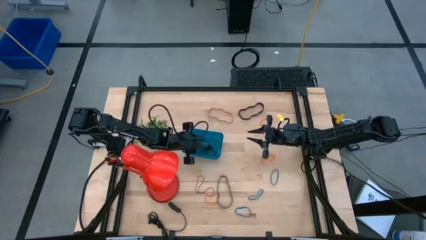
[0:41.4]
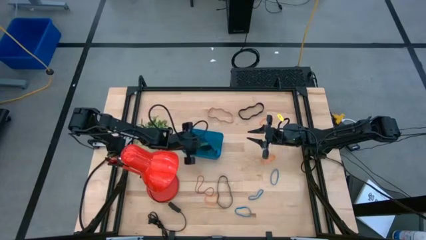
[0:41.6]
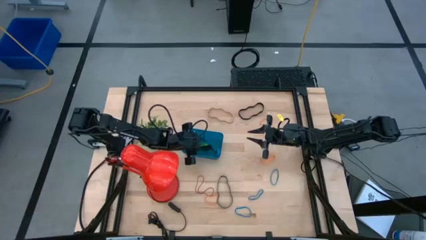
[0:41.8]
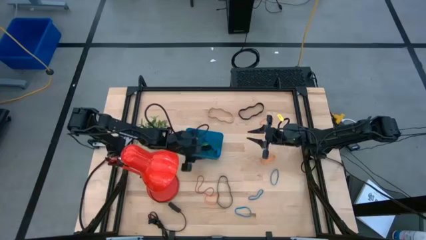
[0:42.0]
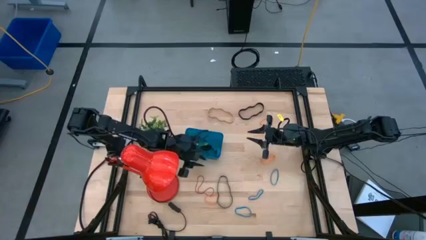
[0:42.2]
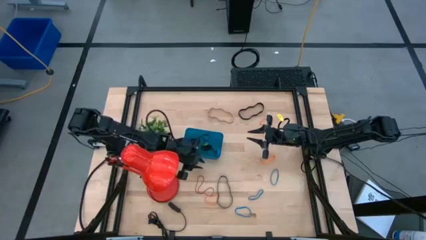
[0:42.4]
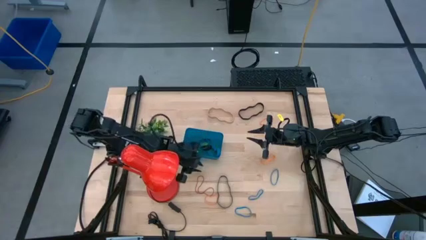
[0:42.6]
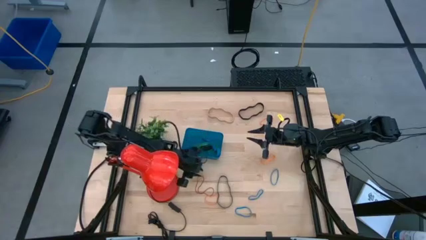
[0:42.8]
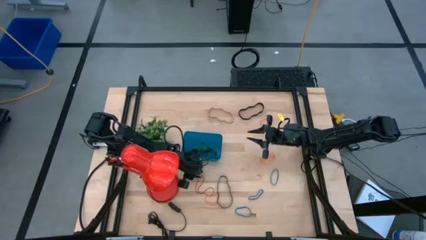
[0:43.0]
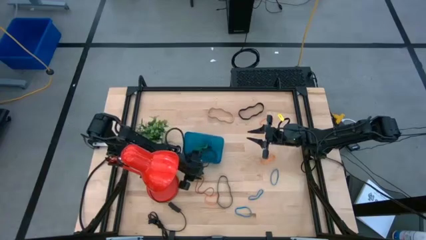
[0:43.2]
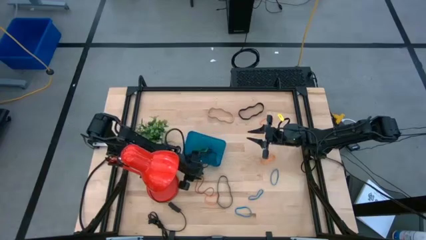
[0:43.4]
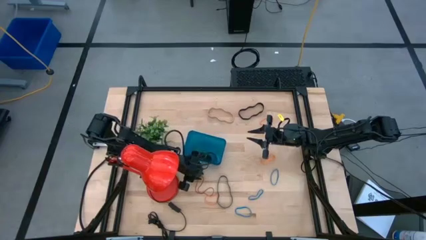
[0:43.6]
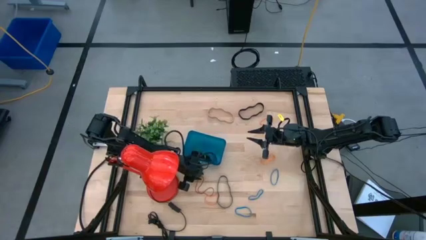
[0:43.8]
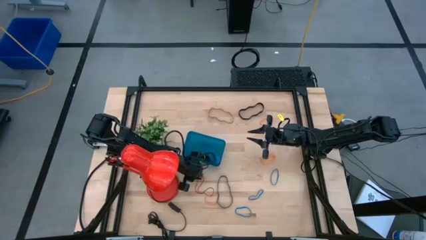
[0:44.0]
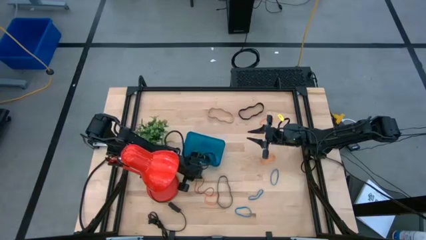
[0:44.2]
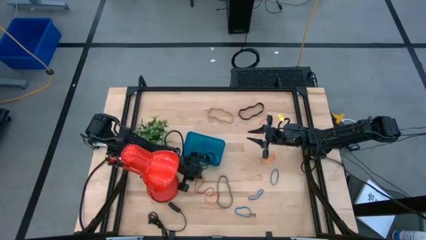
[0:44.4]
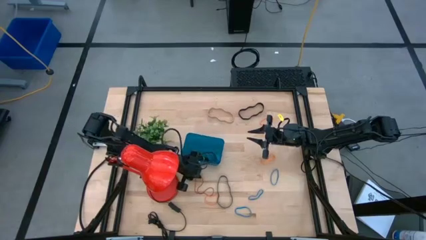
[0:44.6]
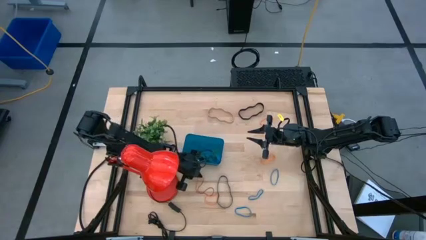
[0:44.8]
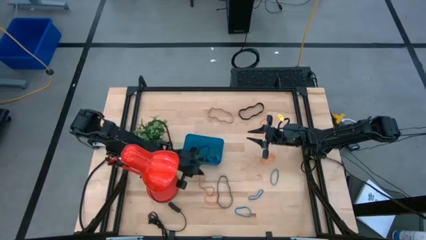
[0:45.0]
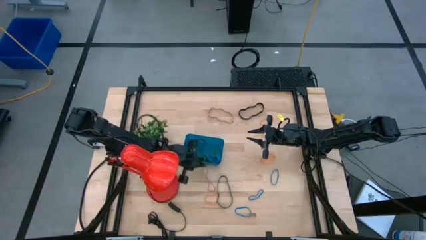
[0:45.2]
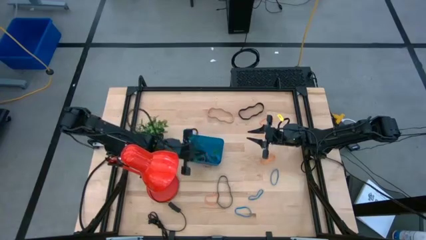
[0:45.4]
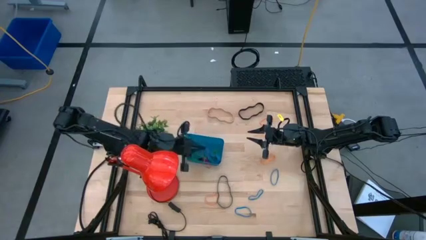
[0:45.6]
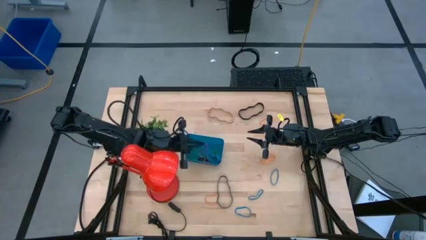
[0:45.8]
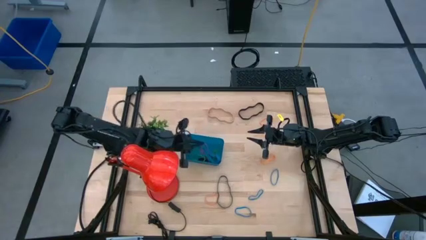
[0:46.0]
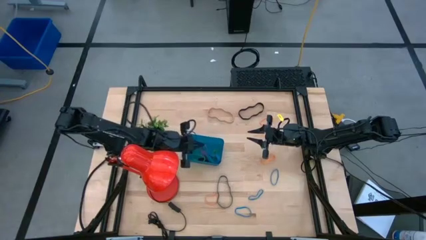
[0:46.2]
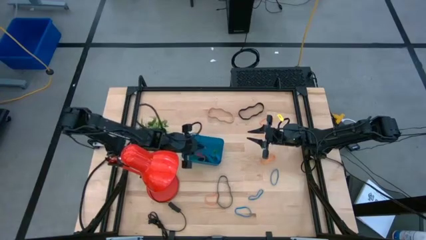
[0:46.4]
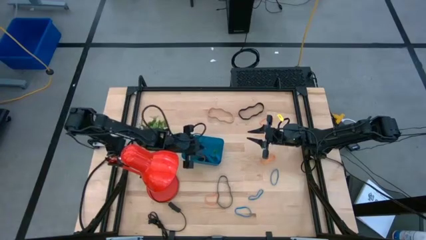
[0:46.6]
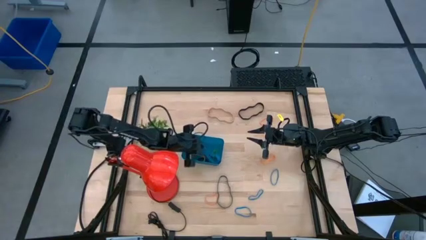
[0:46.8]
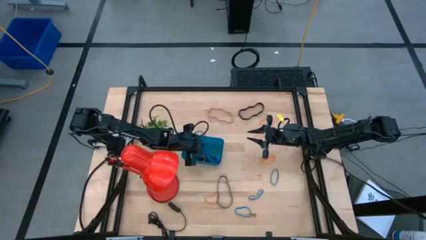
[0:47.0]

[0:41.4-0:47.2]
Task: Pick and place rubber bands into bin
Put the red rubber band into the blue bin

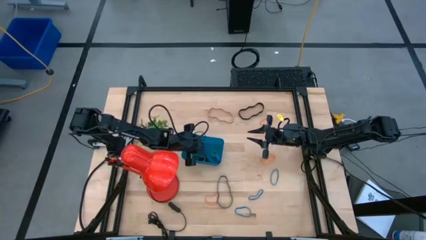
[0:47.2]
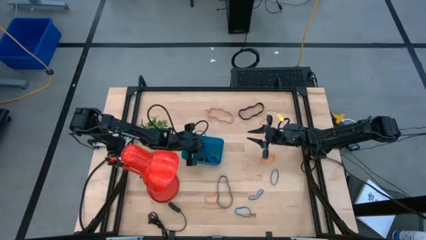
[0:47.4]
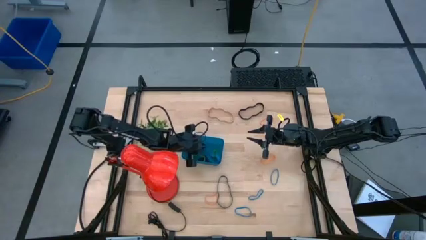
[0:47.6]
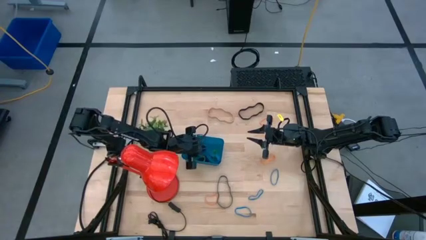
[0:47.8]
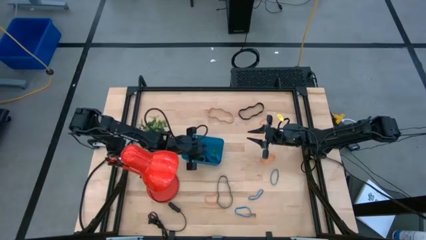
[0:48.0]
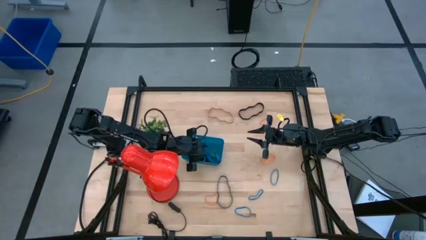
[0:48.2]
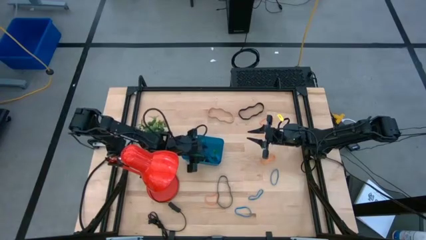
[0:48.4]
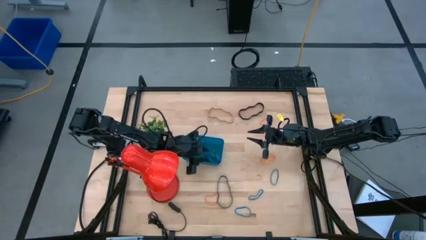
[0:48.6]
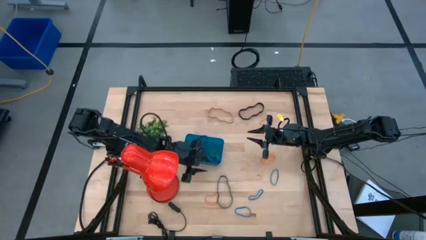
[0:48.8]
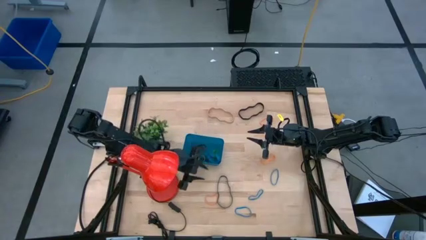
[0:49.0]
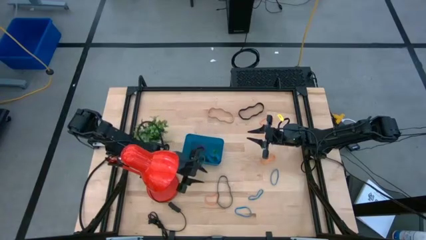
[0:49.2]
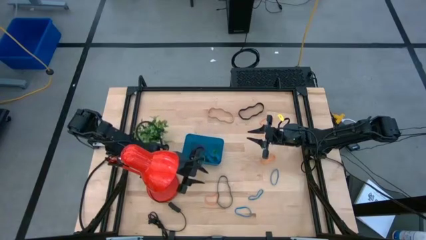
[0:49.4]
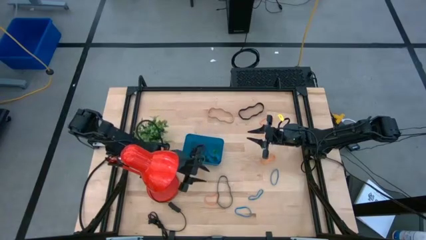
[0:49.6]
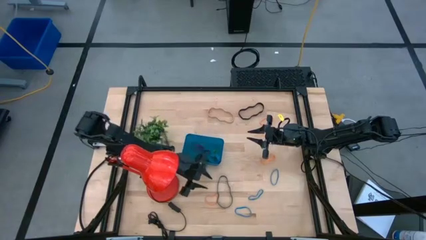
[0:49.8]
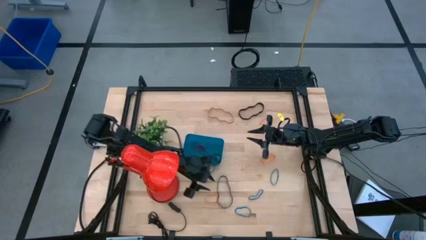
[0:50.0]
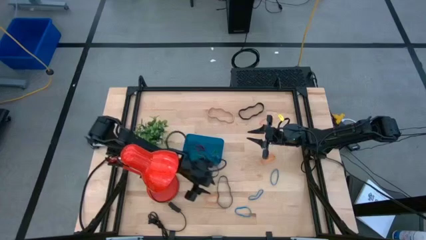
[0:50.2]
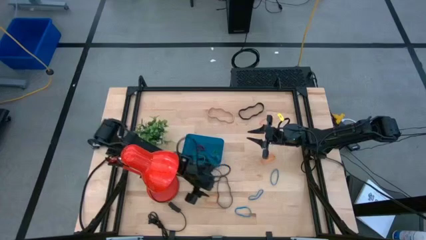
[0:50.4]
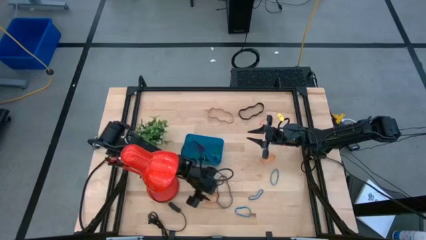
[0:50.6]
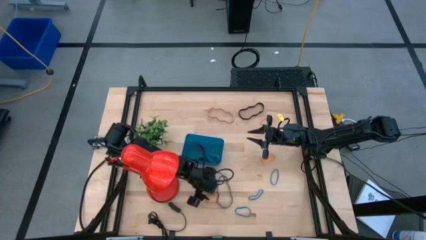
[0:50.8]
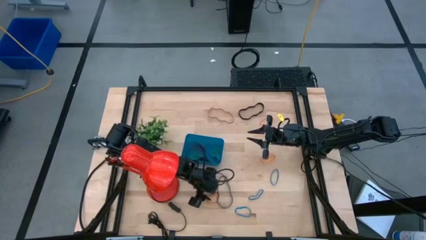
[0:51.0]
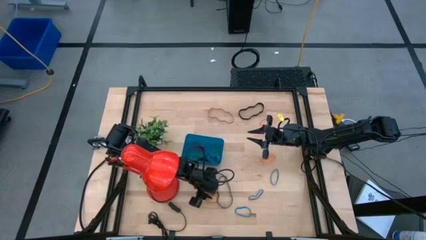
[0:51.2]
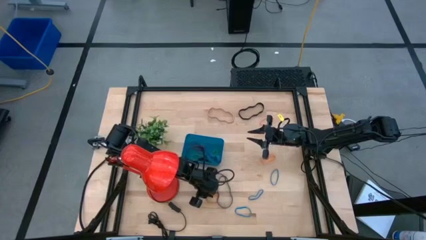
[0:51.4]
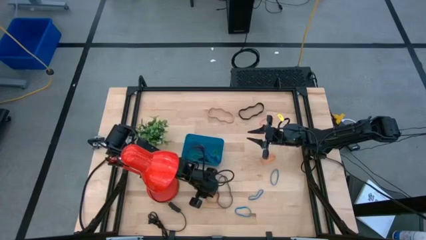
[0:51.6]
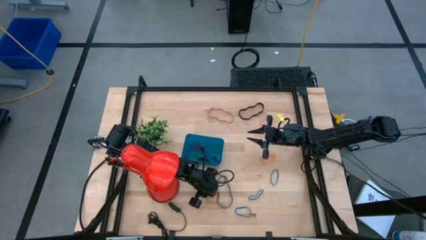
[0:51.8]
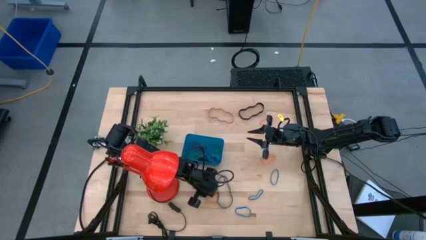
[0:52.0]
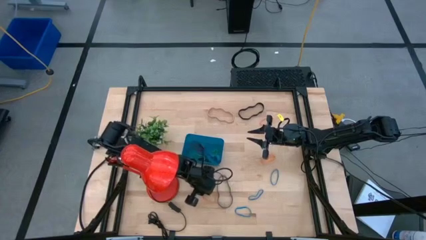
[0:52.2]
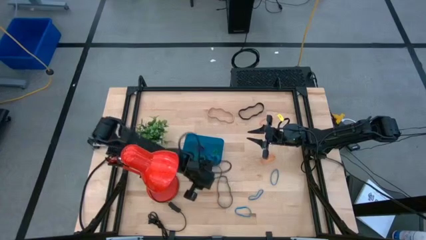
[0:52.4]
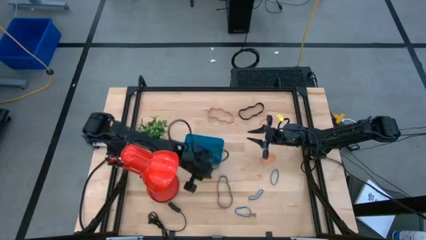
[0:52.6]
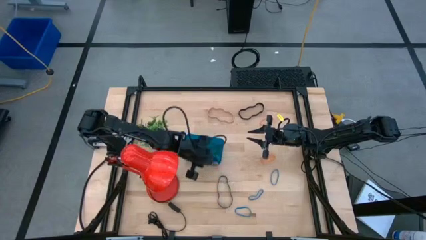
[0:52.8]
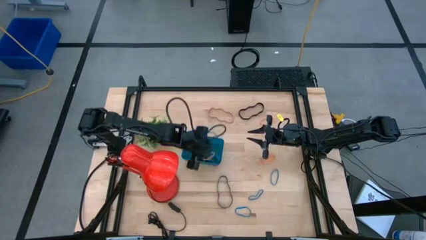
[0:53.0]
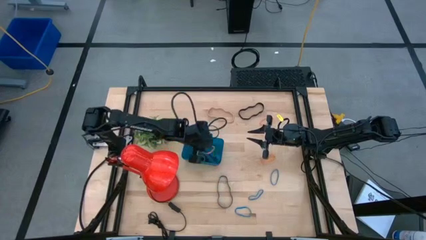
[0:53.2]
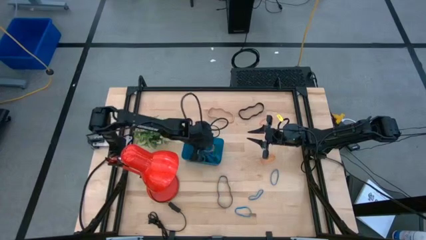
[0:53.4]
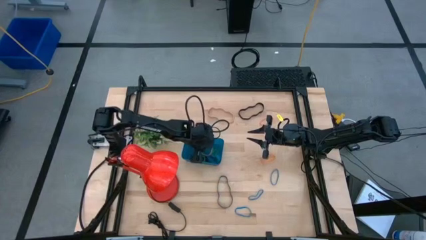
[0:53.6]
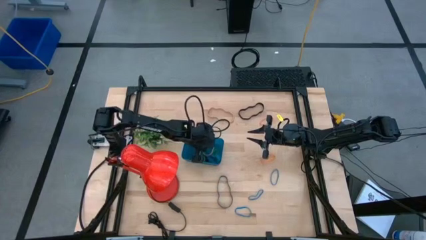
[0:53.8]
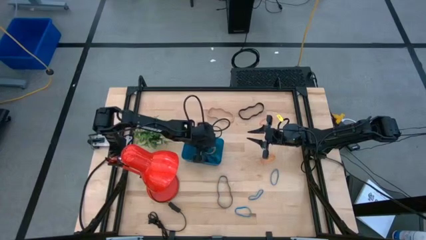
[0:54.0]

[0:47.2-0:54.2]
Put the orange rubber band into the blue bin

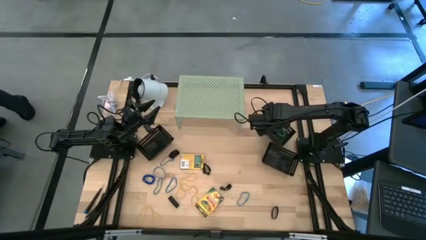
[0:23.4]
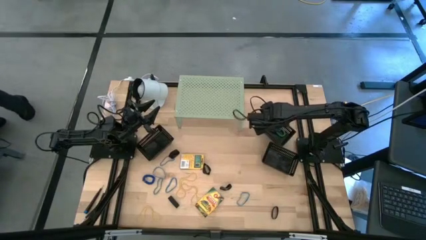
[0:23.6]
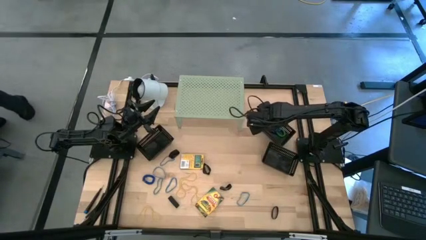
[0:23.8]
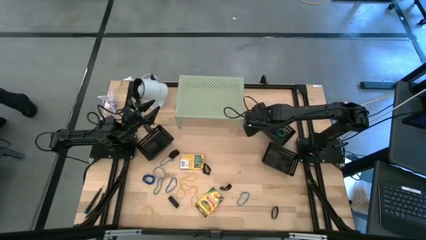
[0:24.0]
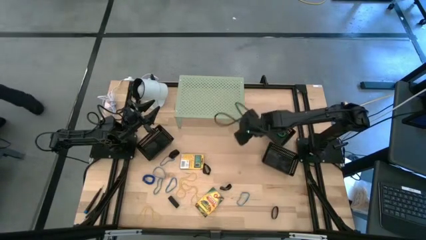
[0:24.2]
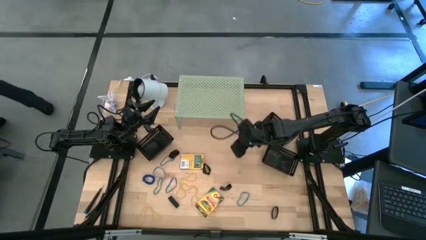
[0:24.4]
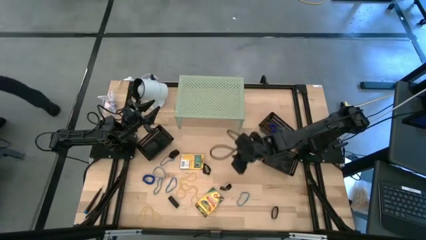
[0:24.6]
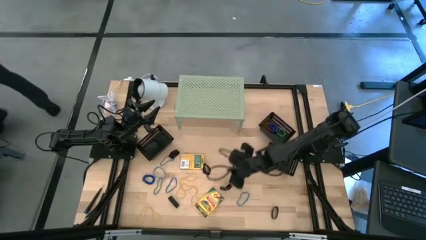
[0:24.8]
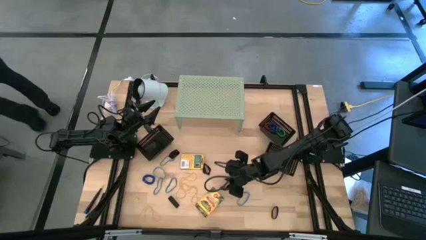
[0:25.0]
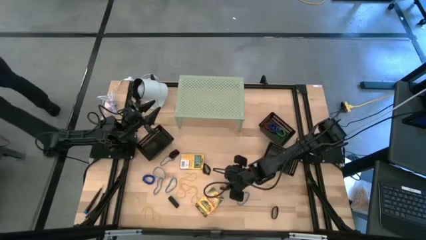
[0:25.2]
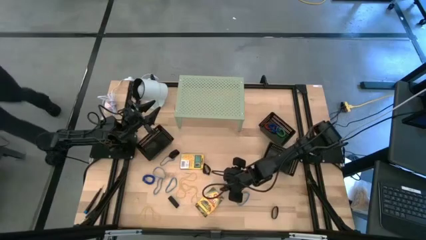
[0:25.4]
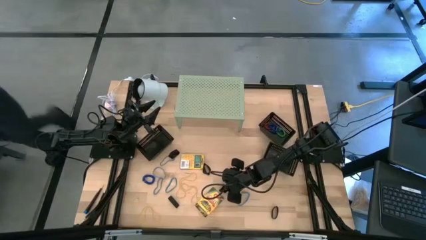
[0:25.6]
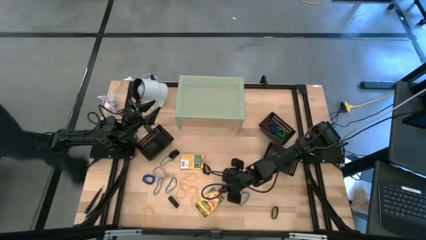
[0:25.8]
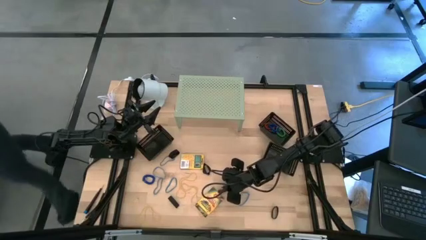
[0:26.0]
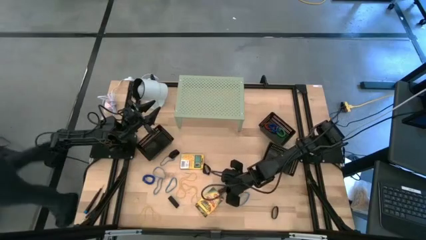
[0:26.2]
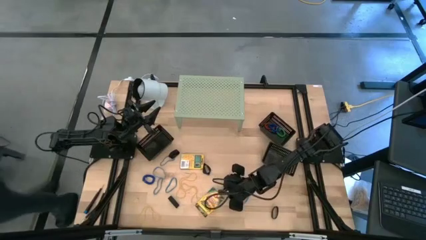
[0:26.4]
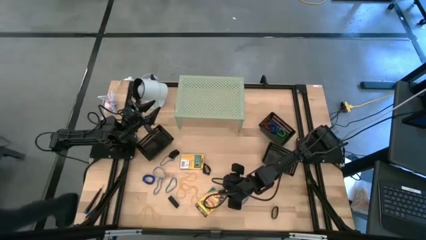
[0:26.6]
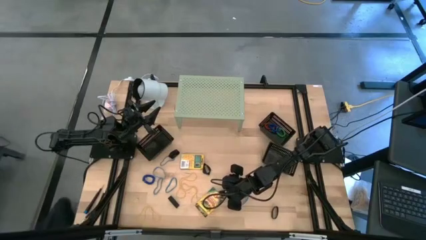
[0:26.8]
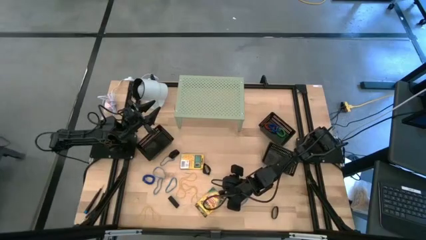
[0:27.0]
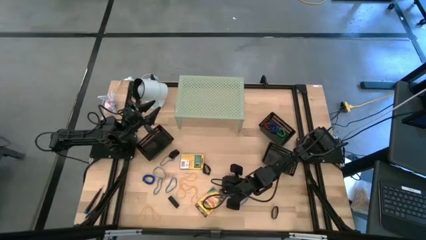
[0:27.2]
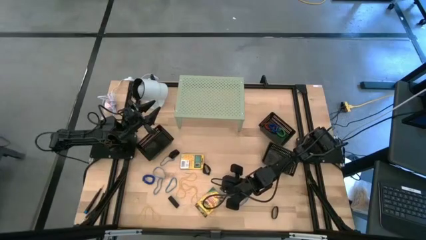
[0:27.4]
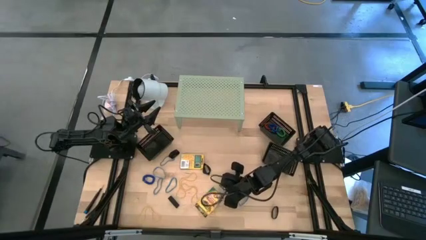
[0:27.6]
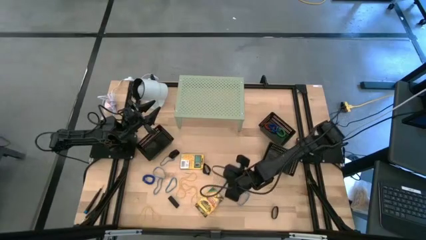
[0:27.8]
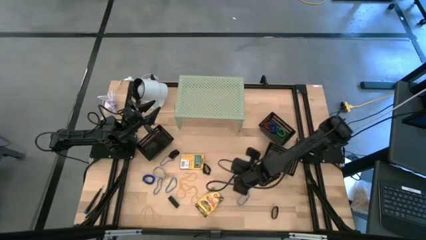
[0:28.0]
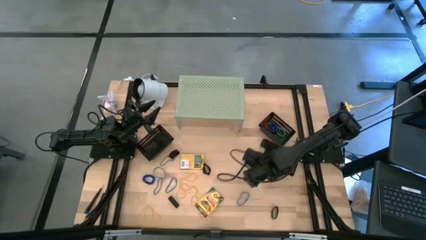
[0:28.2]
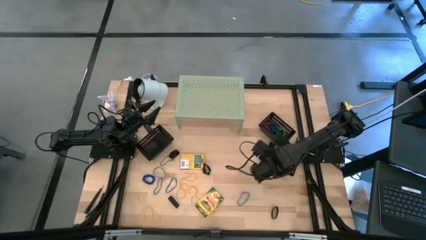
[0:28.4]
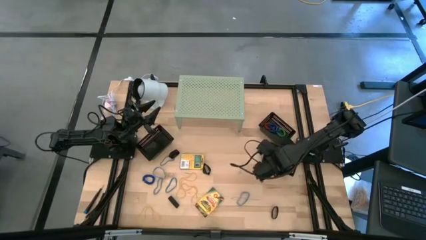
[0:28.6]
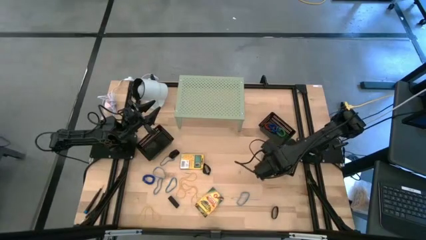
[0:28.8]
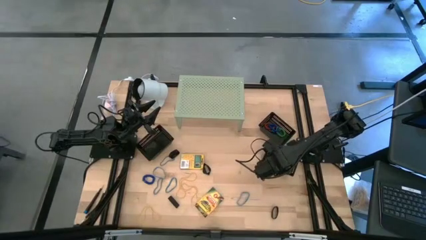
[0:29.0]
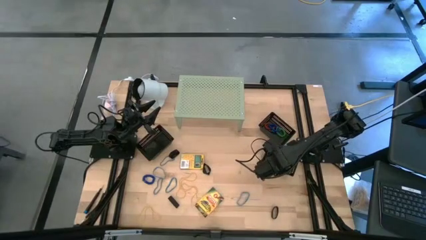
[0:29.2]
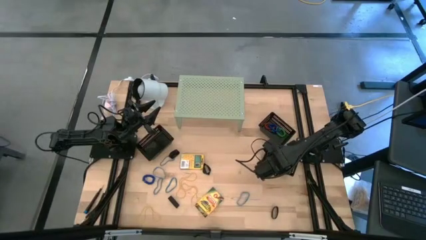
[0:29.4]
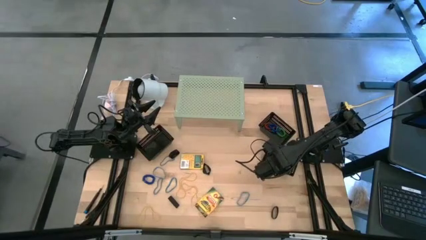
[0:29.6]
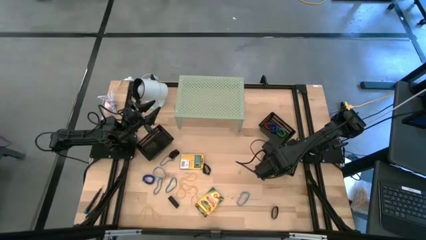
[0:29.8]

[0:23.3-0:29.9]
Task: Pick & Place Office Desk Supplies
Put the black rubber band into the bottom right black bin
